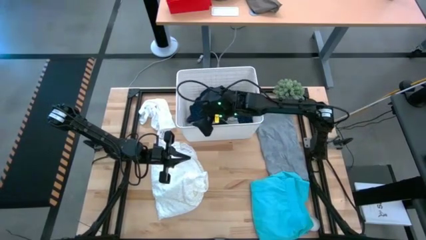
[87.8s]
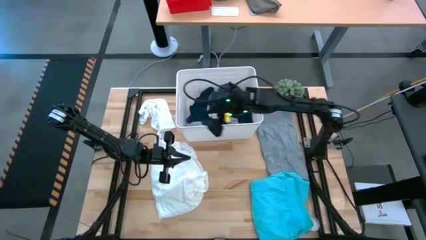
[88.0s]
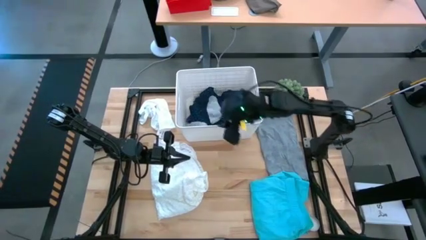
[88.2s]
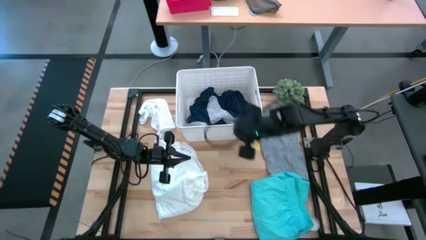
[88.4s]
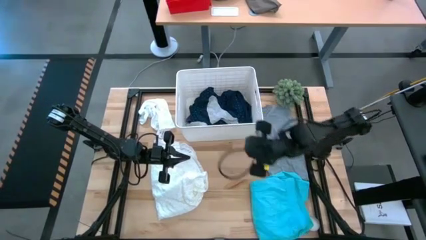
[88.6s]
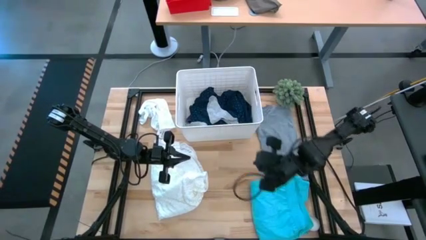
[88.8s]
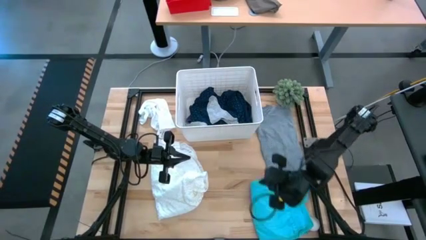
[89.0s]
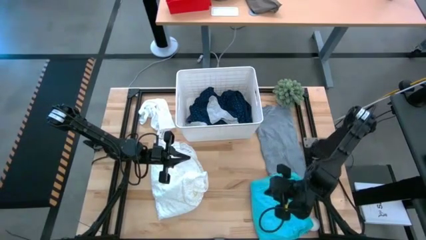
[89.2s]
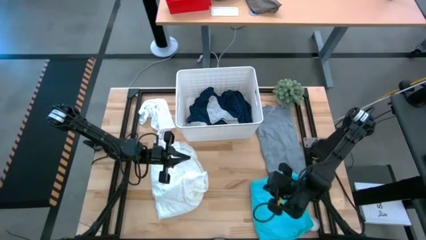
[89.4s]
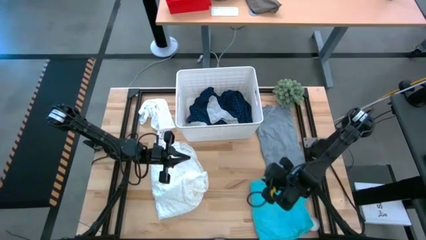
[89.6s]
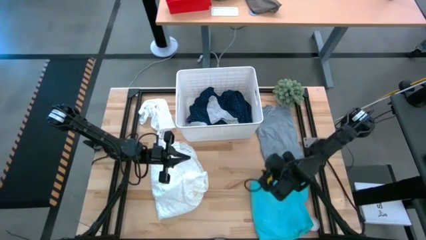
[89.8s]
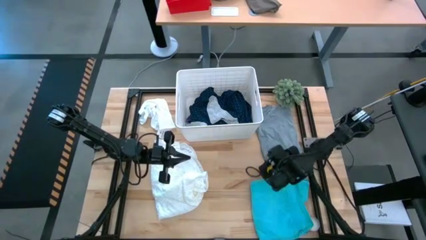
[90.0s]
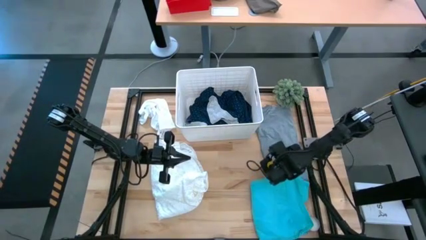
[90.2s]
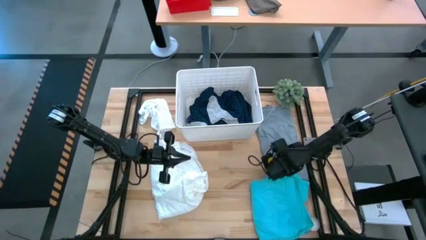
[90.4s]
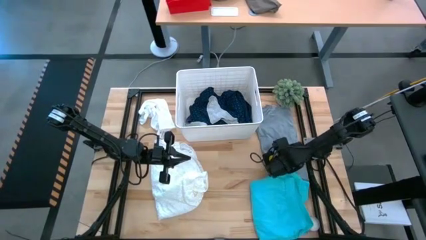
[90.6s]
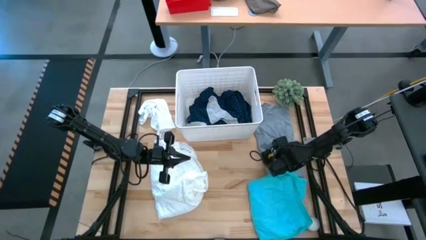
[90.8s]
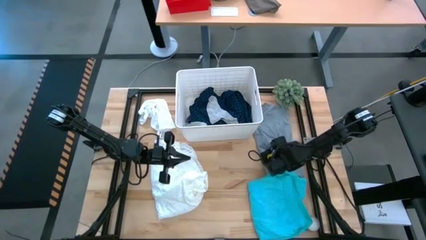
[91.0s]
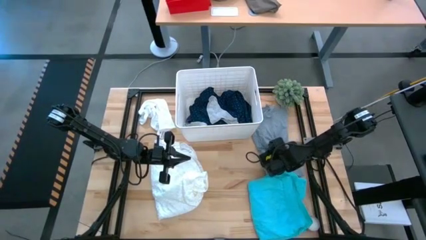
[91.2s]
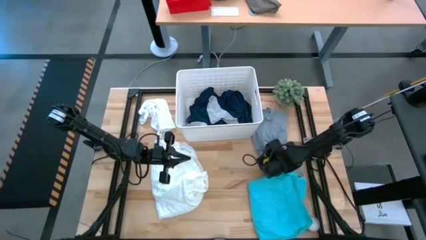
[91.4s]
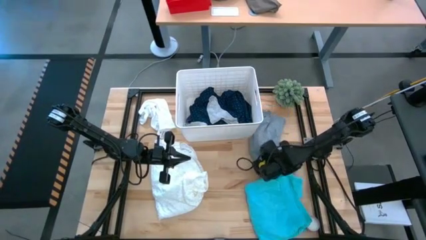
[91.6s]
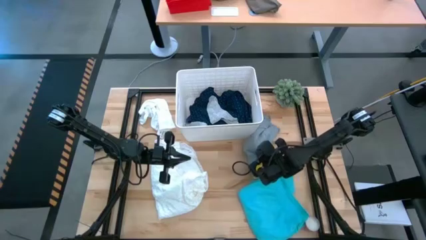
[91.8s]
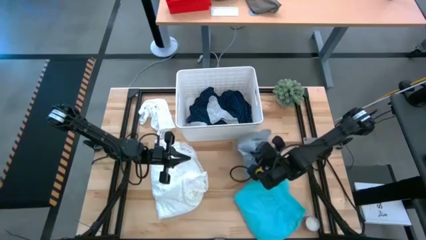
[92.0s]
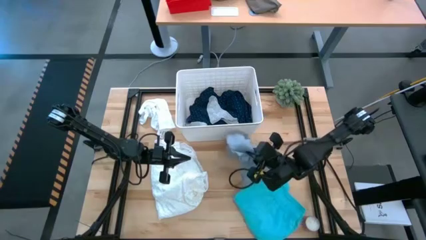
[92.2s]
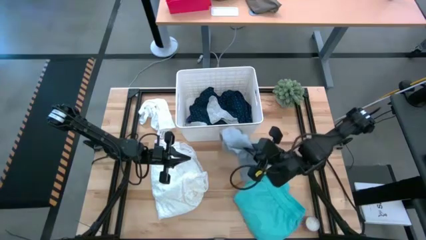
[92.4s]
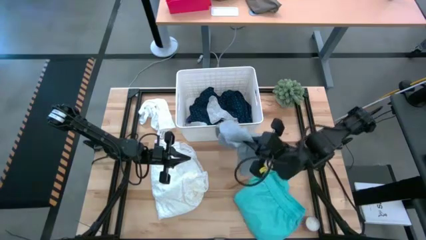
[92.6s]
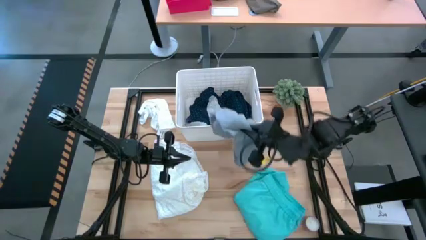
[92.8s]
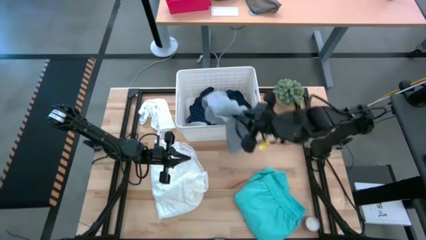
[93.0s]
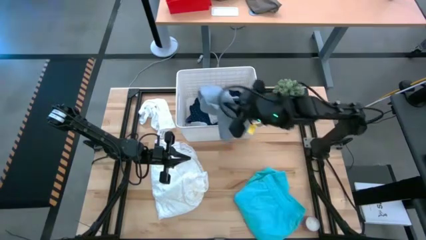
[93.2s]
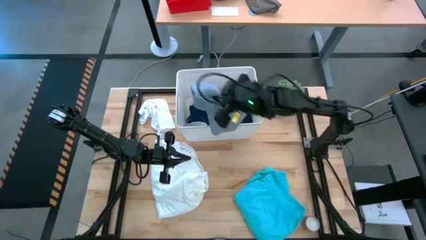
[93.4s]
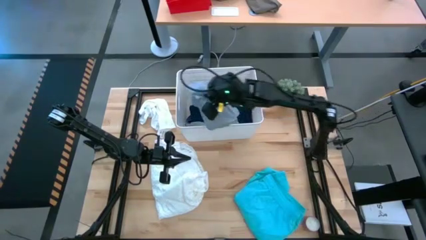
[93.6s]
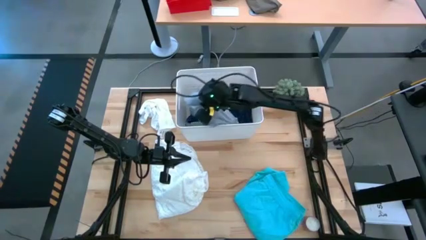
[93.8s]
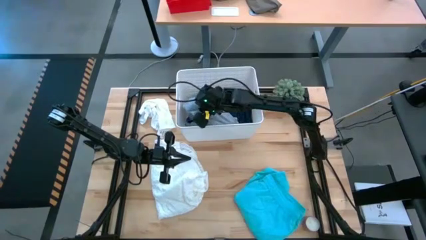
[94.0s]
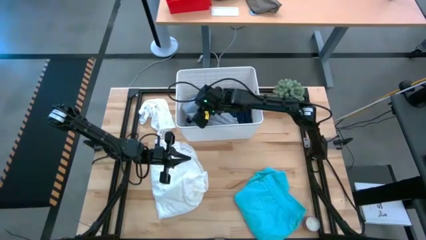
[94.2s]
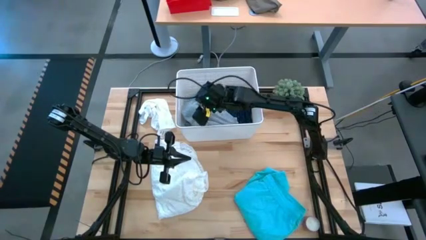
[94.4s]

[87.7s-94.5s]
Task: Sort clothes
Put the gray shirt into the white laundry bin

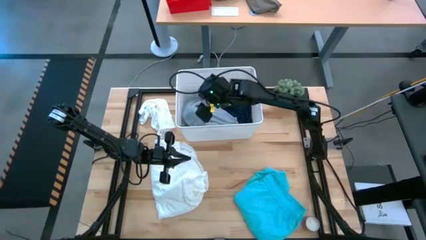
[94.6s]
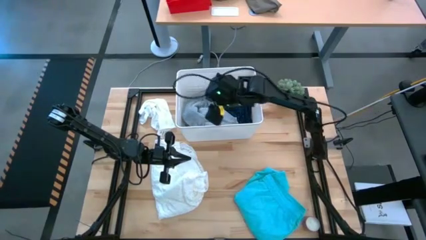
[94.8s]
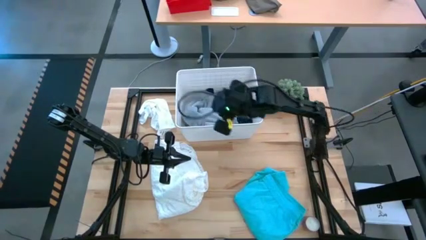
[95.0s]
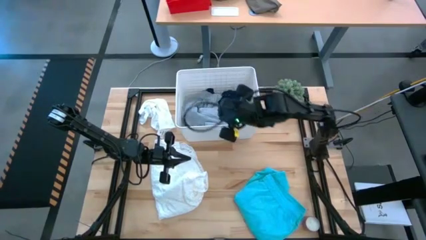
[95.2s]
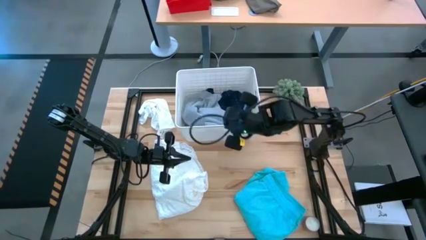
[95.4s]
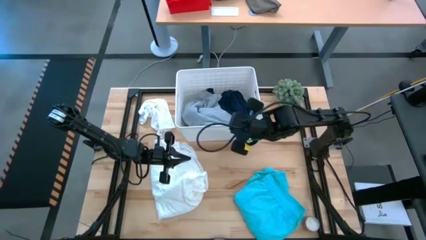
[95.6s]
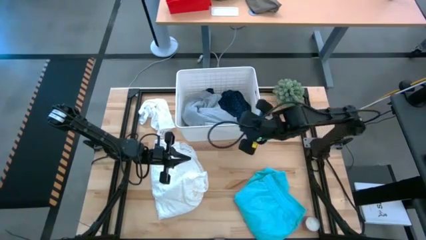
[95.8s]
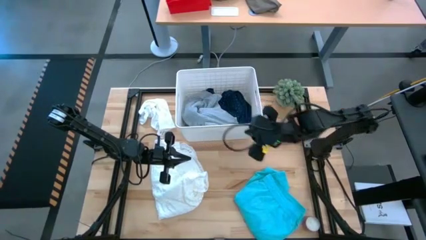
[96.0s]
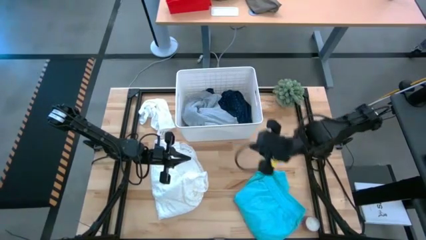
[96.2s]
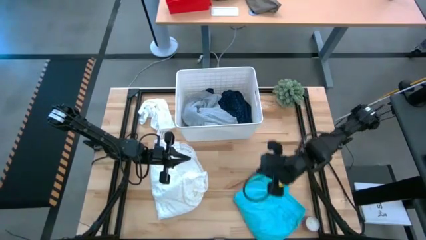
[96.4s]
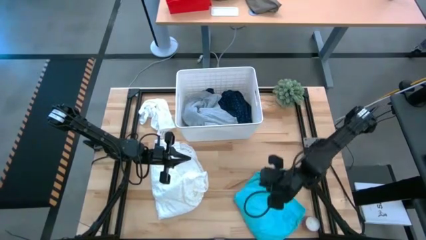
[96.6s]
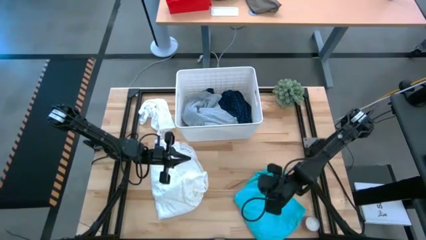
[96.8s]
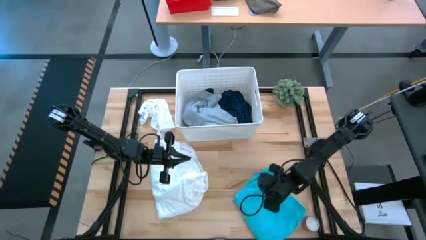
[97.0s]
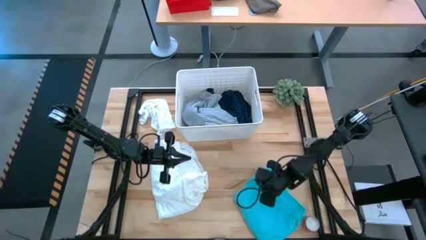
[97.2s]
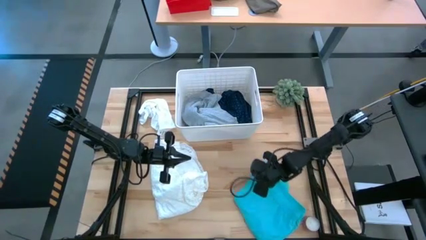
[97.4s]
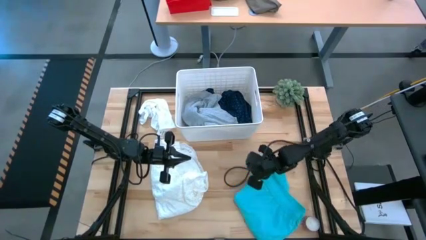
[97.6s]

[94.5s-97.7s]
Put the light blue shorts into the white laundry bin

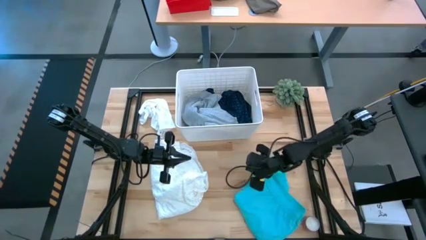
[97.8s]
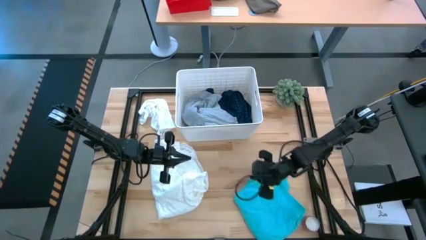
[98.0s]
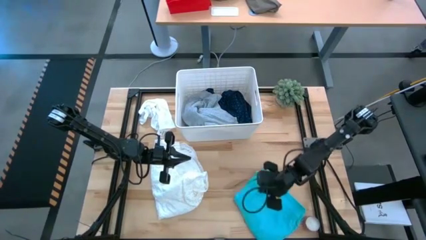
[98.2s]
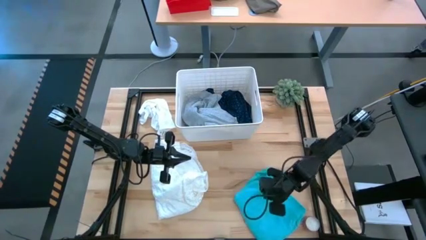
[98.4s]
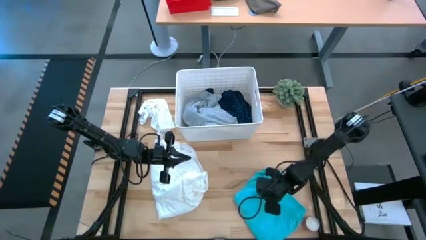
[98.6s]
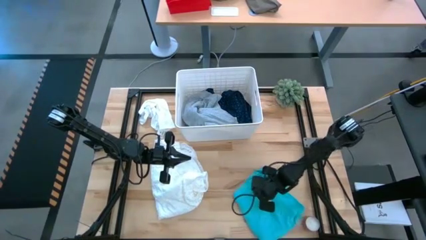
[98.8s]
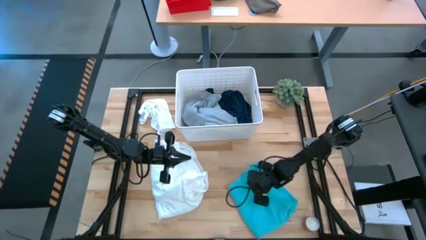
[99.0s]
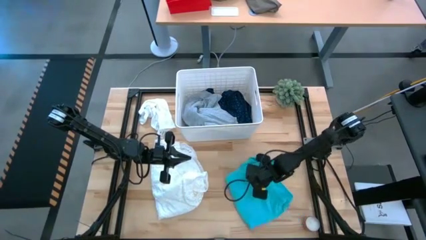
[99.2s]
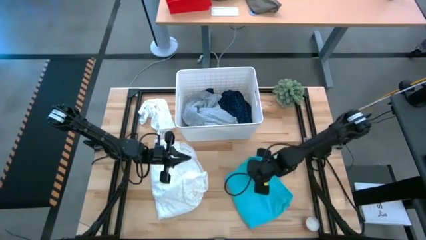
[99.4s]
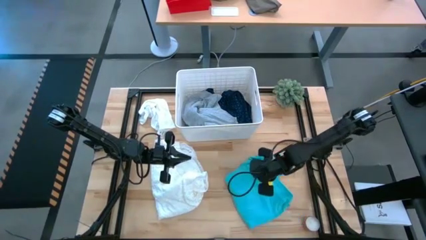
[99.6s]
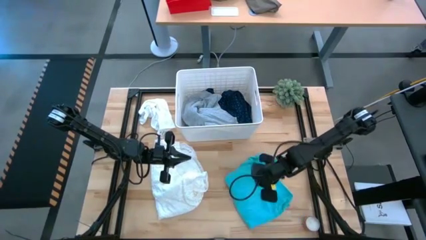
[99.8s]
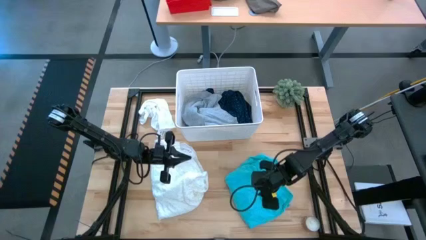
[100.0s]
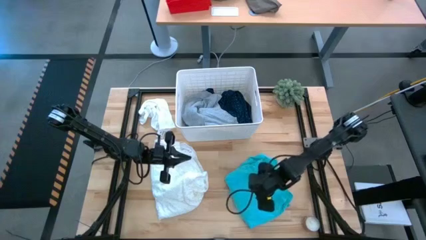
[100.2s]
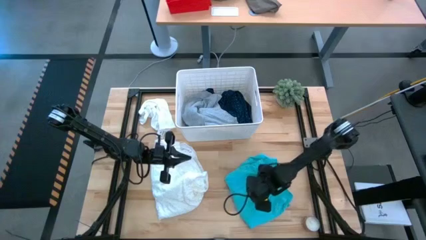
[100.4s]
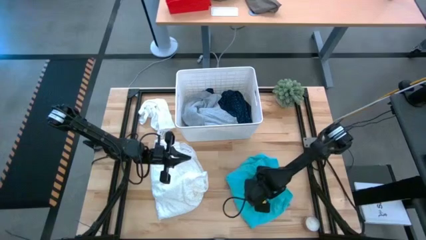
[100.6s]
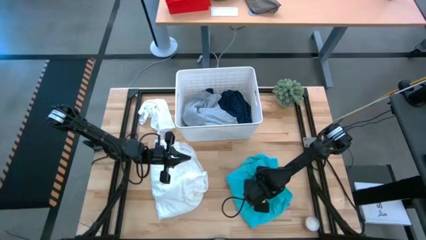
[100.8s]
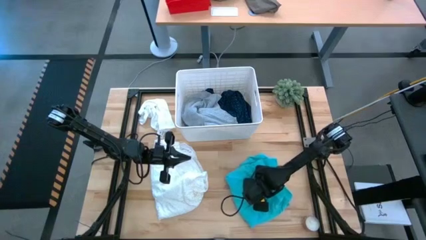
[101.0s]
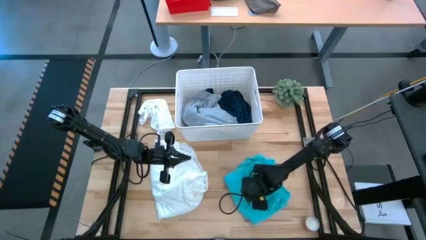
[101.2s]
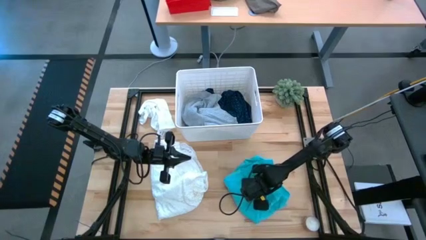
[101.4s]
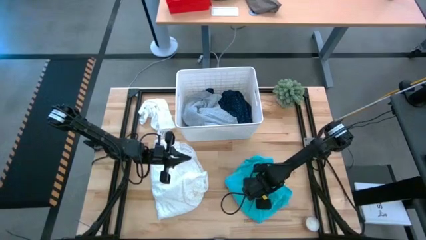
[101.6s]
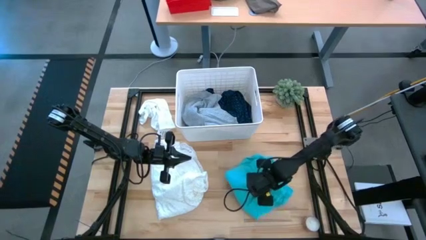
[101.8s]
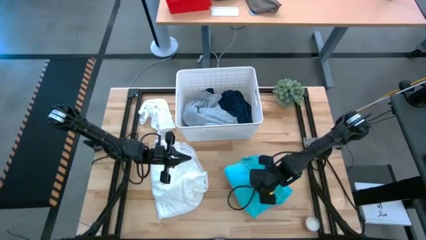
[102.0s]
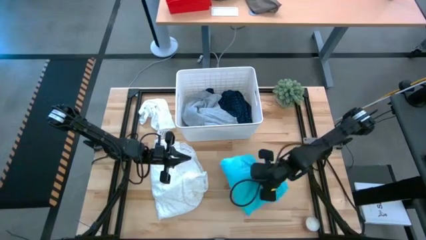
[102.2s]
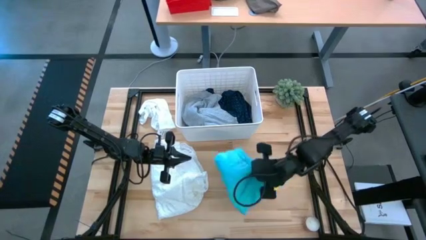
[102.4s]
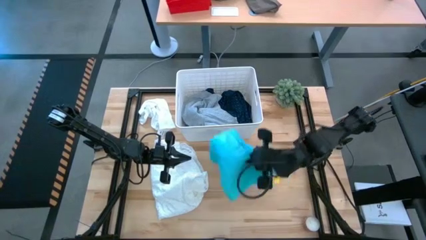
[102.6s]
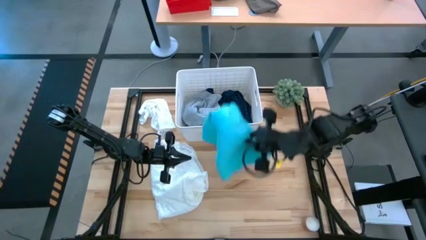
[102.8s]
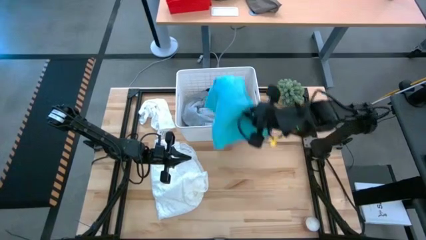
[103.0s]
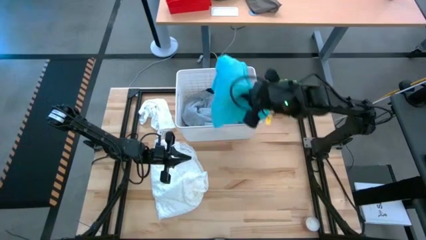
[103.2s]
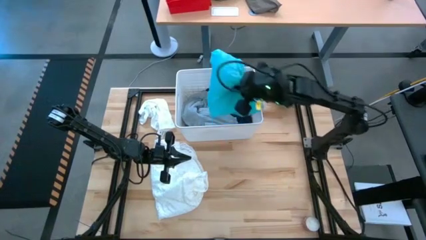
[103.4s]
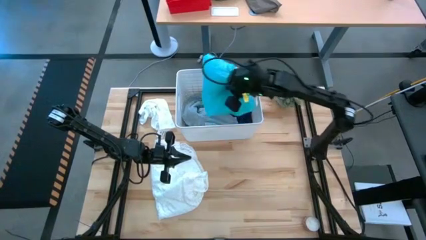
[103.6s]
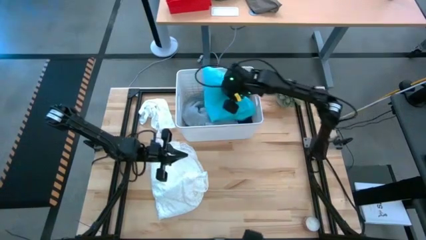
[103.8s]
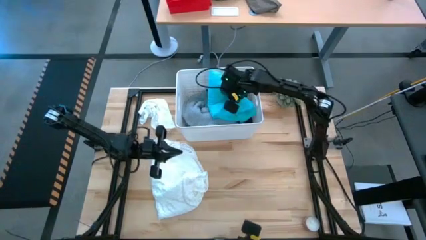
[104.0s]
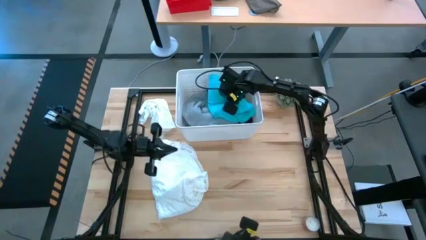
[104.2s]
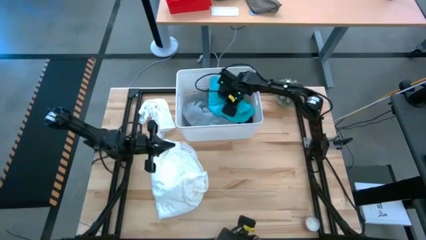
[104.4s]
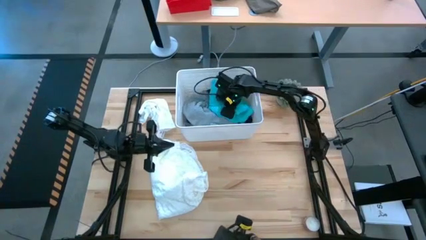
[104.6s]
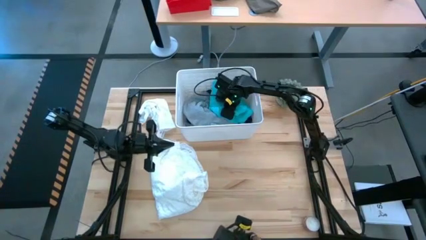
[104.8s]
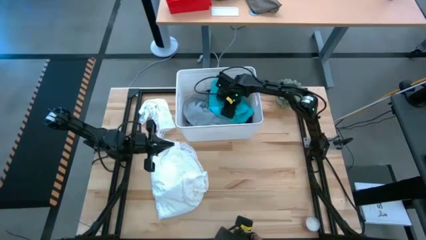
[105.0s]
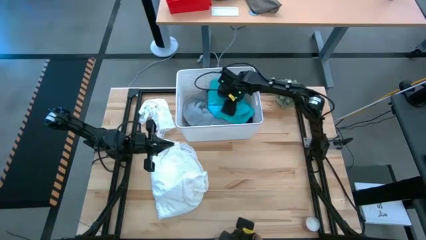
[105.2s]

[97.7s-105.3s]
Put the light blue shorts into the white laundry bin
